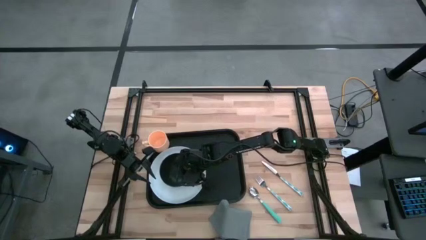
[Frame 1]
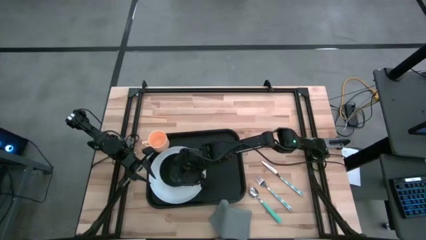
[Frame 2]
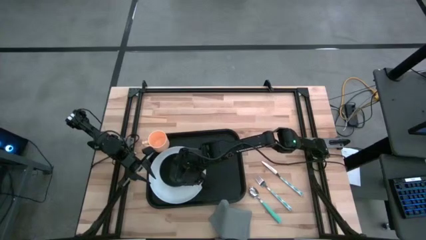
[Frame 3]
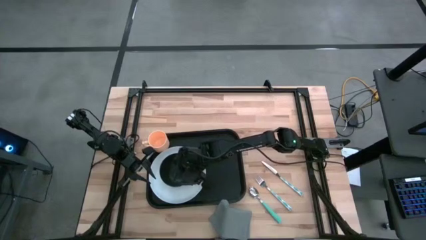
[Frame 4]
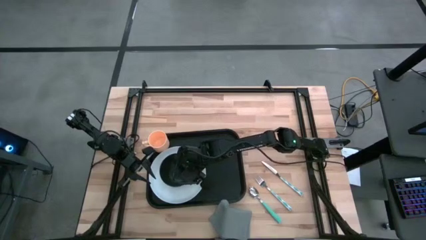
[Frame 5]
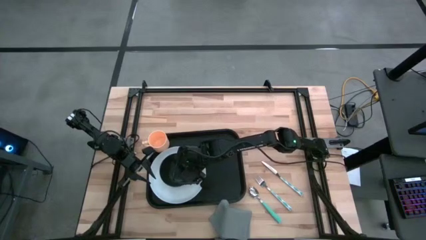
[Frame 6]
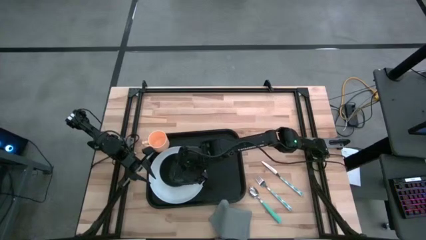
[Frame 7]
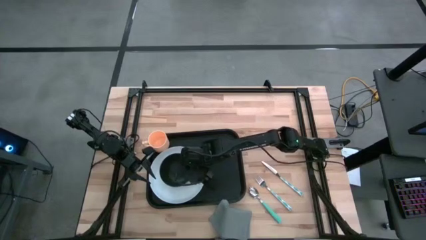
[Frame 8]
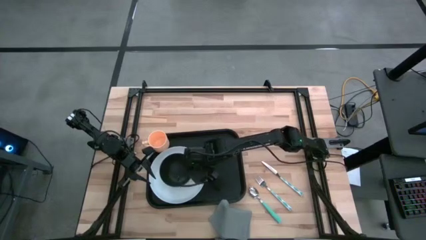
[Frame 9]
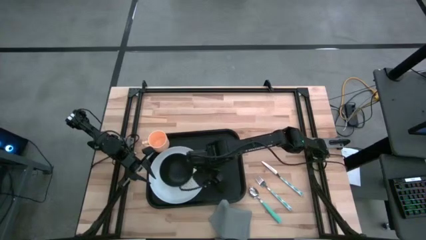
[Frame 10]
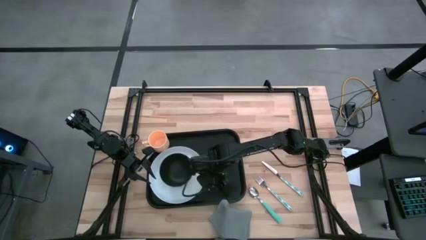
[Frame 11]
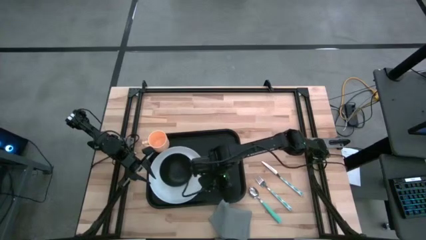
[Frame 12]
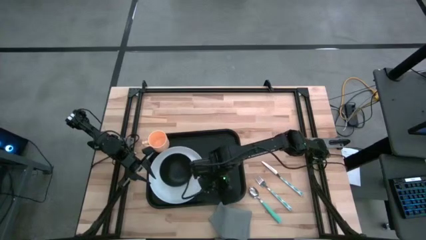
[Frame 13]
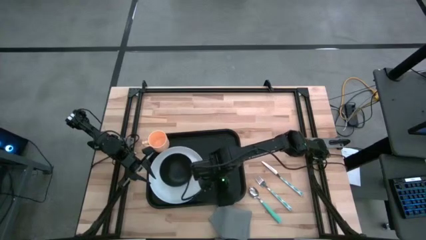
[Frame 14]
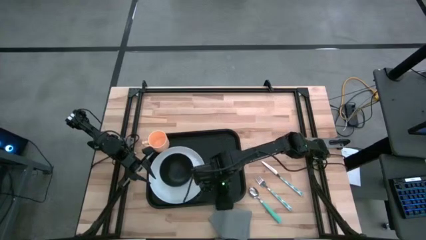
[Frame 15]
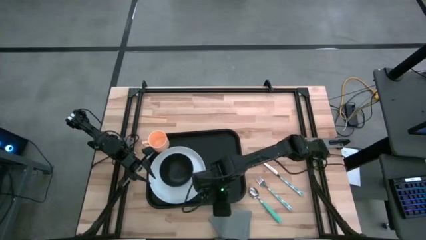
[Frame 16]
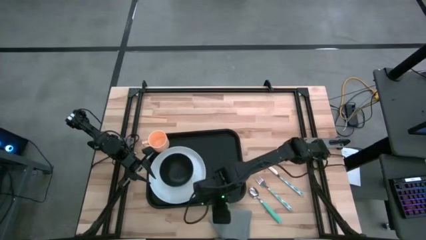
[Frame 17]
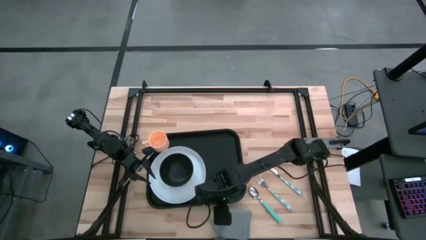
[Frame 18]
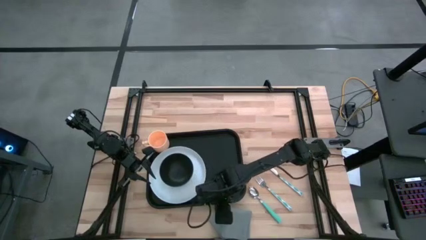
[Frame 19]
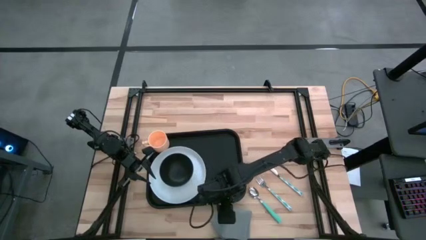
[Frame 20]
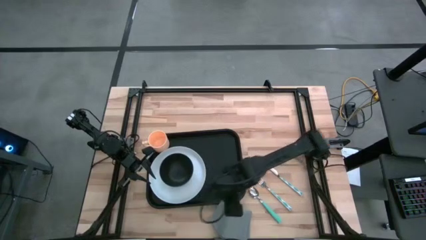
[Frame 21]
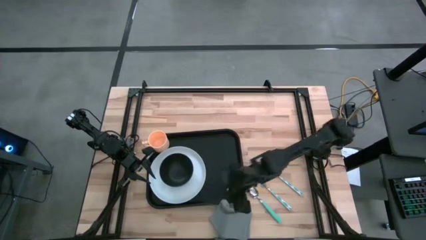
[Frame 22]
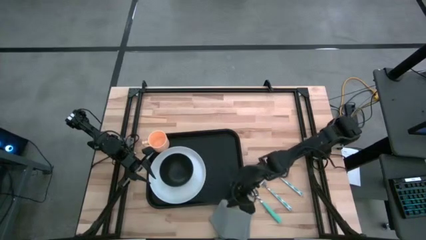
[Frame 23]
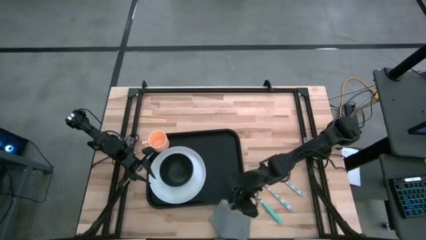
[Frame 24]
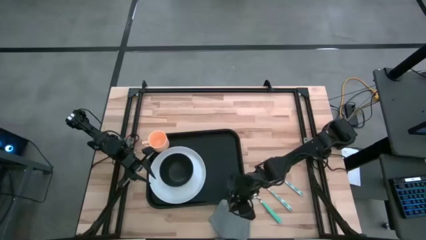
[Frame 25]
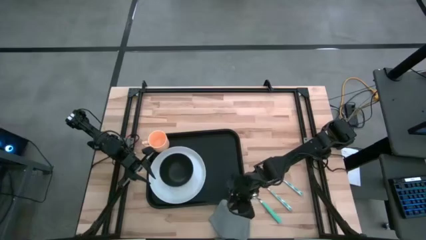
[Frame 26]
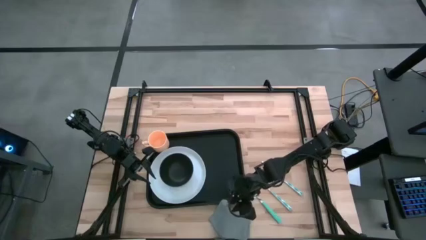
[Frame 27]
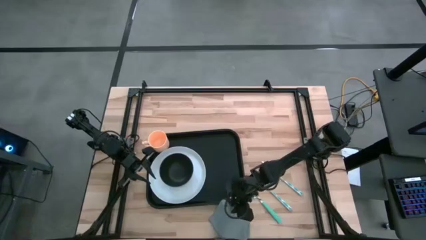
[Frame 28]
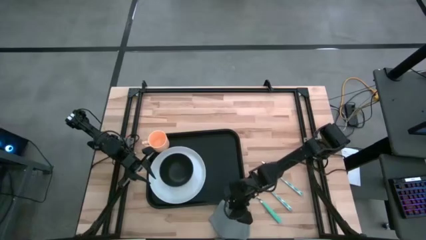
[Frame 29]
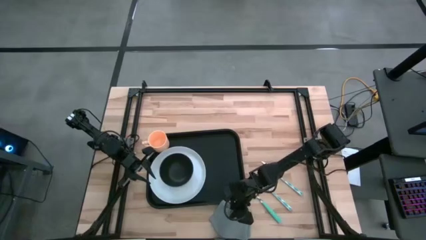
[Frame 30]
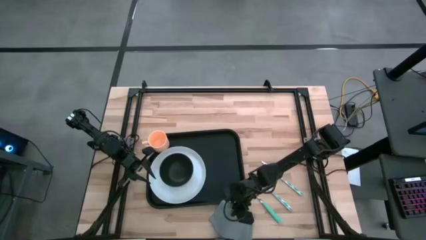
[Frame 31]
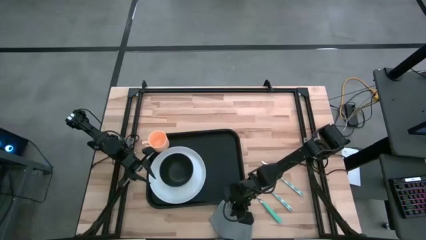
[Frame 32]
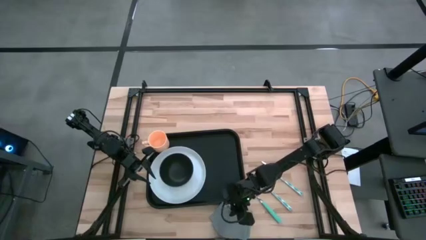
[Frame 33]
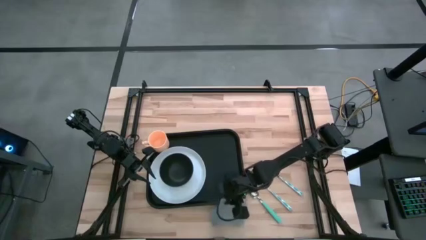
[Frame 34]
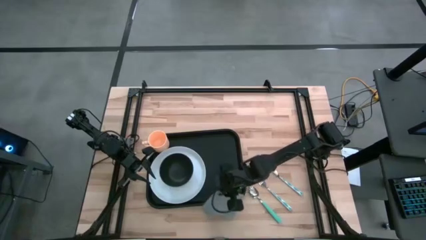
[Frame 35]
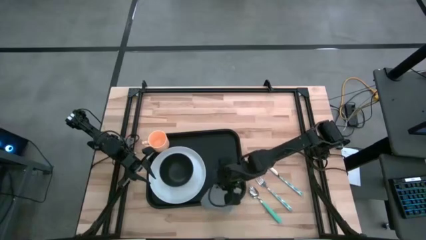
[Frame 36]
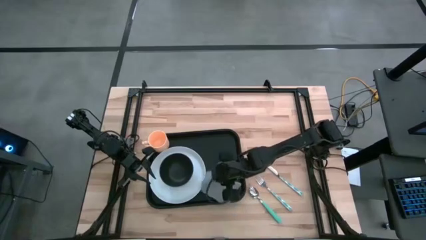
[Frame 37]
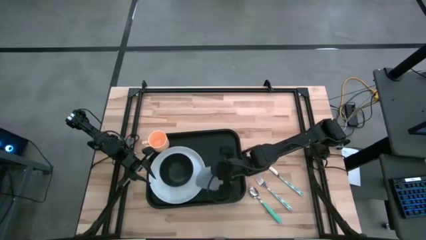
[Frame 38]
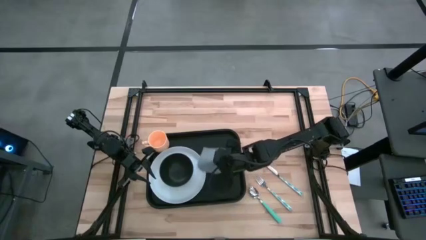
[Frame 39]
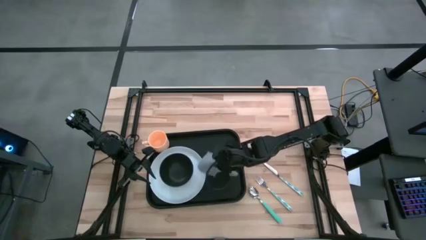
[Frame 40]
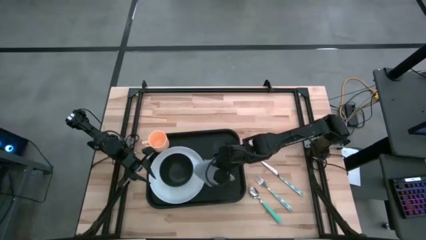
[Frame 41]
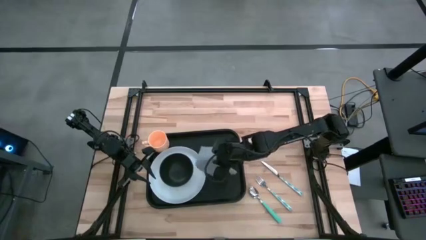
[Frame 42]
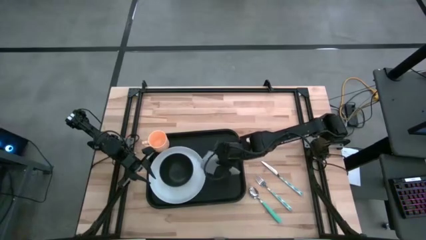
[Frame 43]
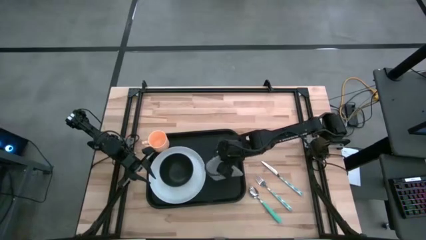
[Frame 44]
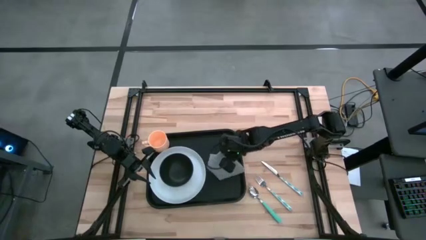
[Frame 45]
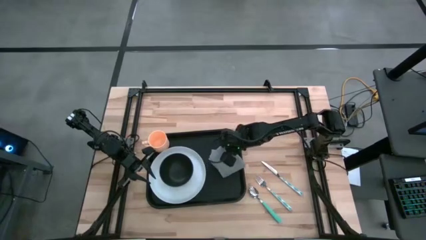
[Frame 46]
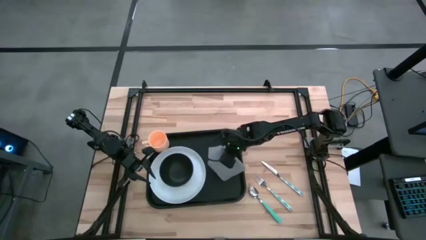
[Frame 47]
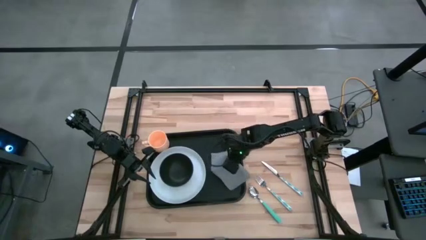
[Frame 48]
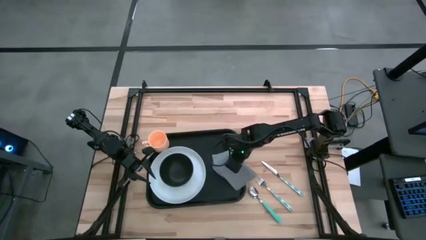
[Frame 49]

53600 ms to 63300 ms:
Task: Set up tray
Put the gray napkin on the black tray to the right of the white plate

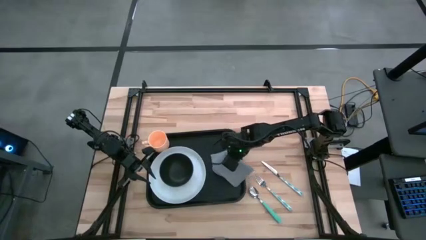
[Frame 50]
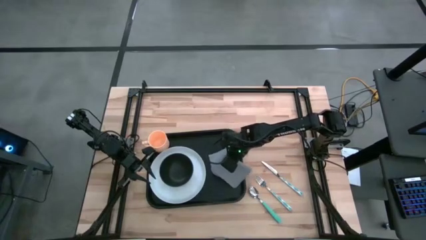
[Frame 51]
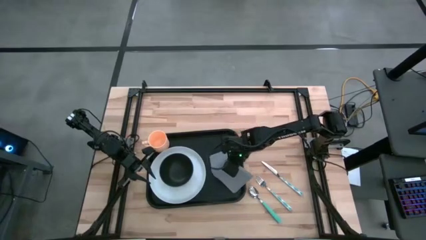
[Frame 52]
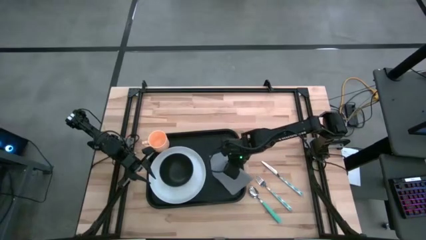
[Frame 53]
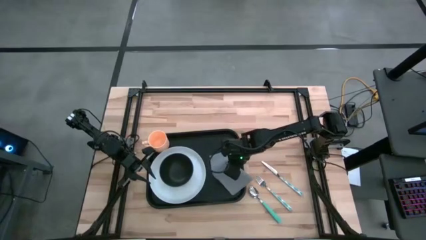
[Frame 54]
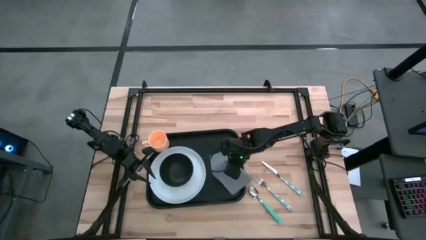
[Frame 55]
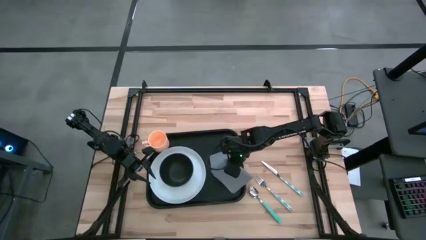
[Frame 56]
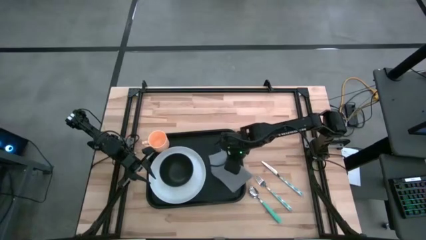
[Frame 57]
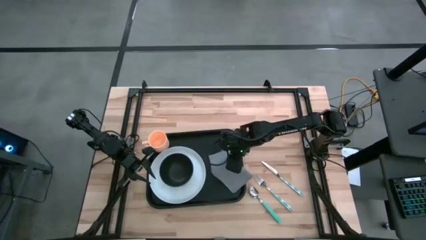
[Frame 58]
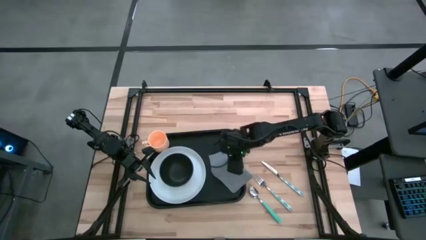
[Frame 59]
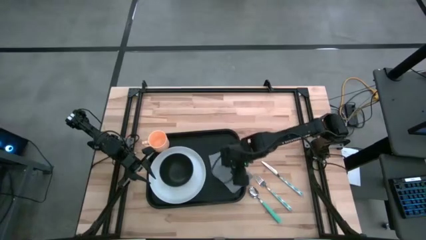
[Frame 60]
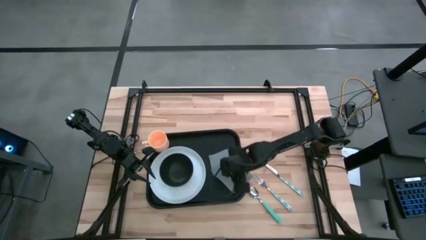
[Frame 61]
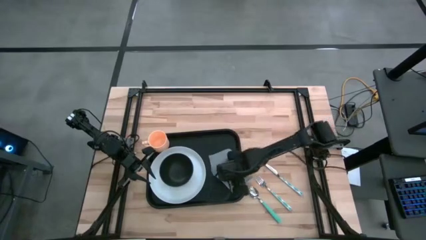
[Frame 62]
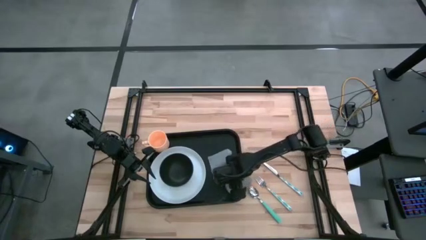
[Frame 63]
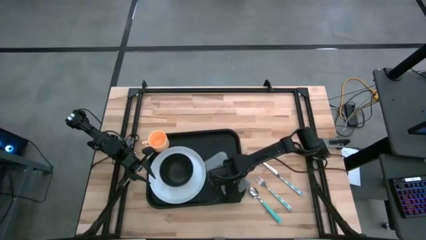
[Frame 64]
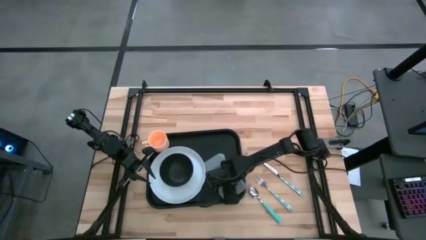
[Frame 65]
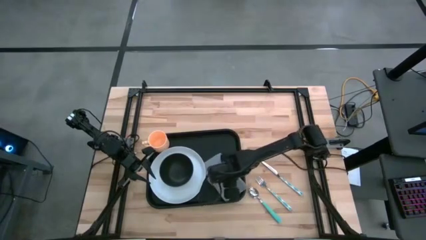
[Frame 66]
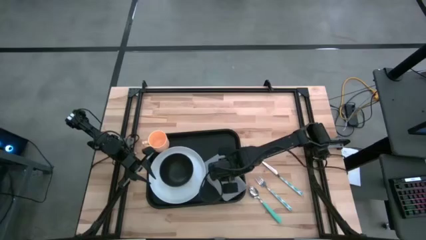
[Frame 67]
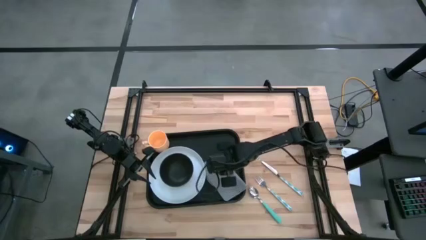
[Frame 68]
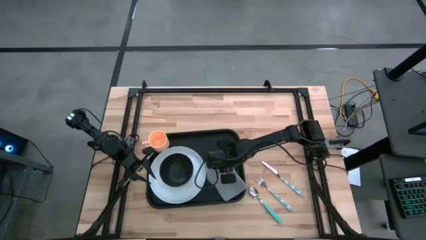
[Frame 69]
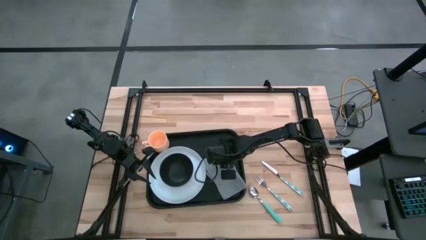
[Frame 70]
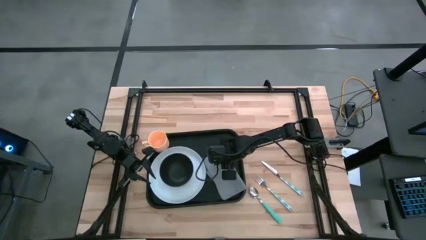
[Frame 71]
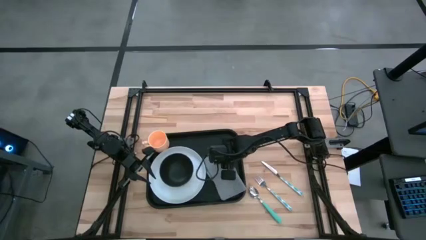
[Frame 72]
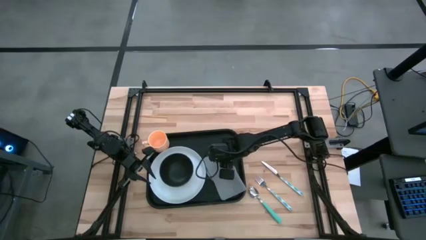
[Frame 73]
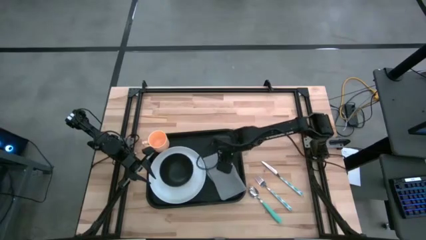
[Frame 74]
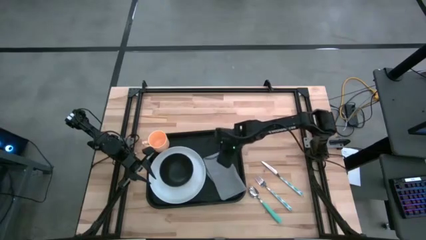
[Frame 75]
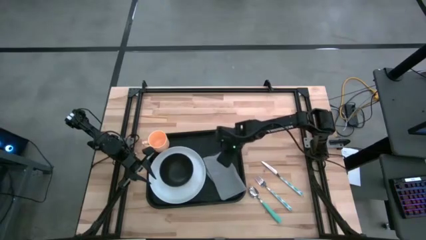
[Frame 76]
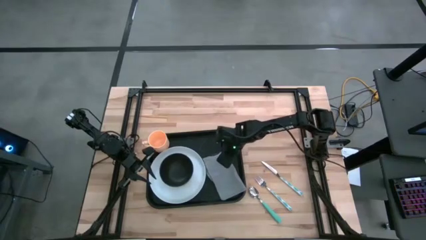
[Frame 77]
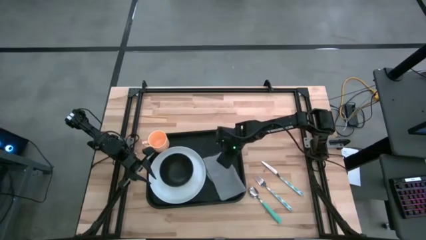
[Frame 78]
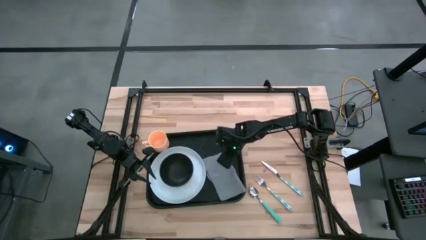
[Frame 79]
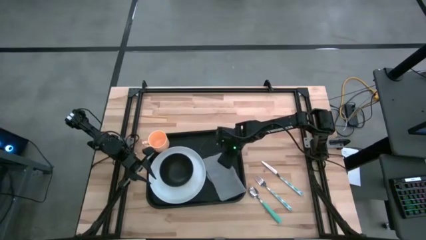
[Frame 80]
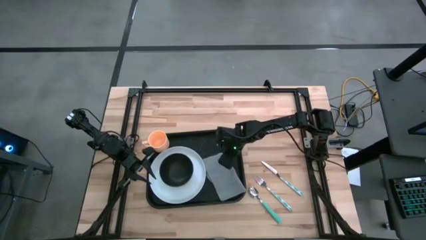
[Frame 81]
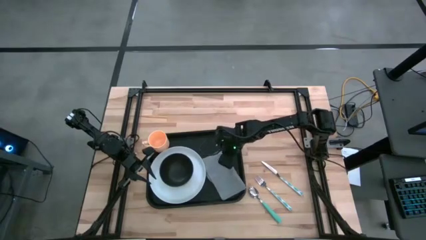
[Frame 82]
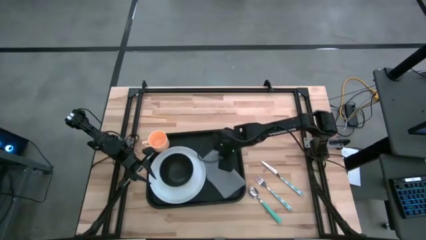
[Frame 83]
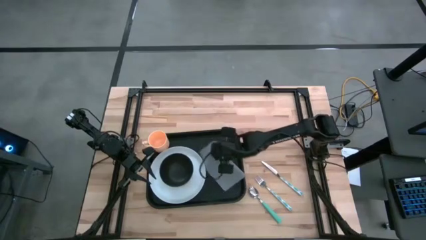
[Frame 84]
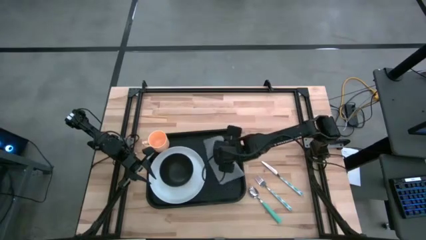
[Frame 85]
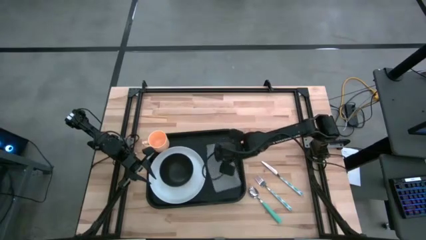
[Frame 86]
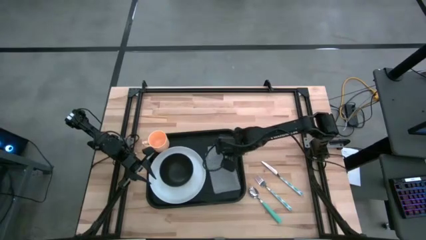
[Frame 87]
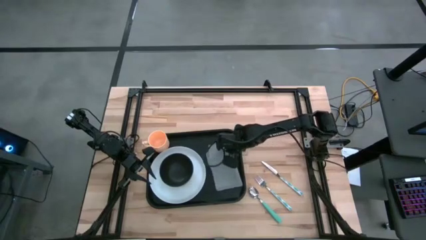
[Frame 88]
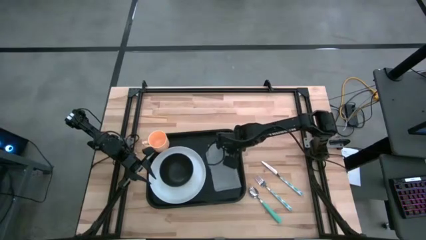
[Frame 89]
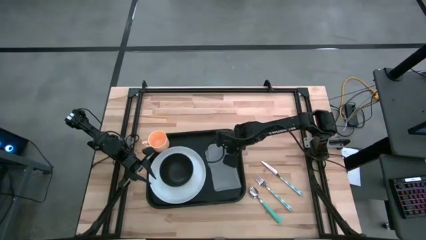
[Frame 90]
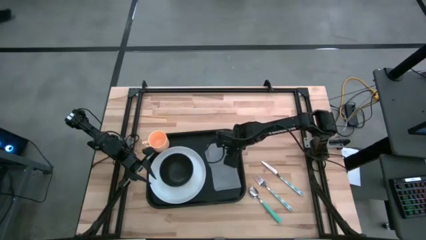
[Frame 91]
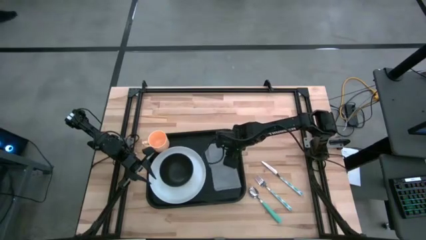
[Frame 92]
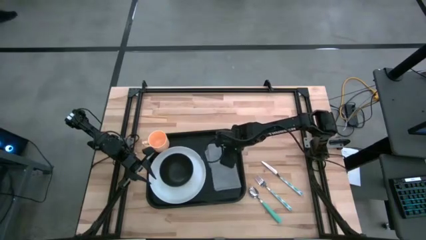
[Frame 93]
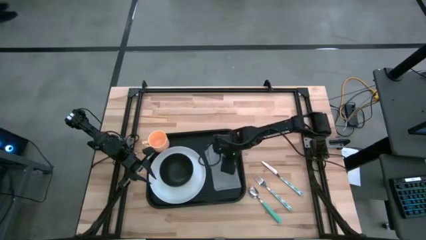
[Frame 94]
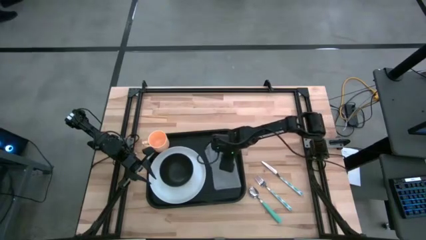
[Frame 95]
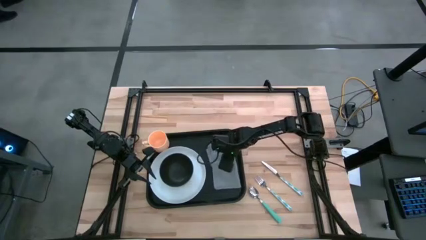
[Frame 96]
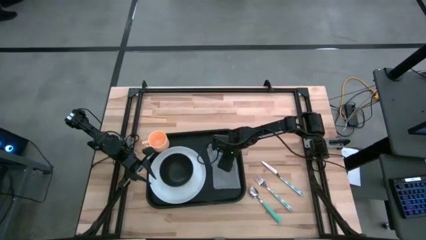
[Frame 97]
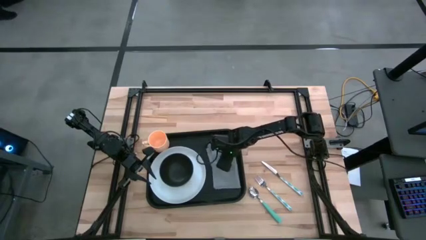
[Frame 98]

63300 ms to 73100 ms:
Put the gray napkin on the black tray to the right of the white plate
